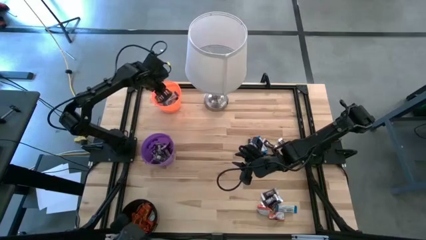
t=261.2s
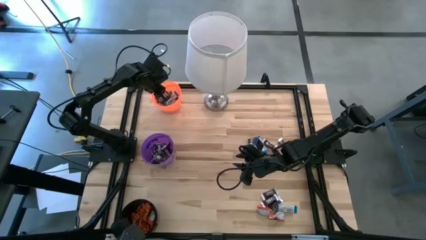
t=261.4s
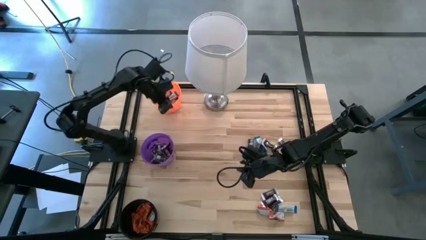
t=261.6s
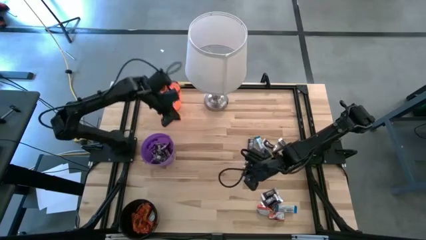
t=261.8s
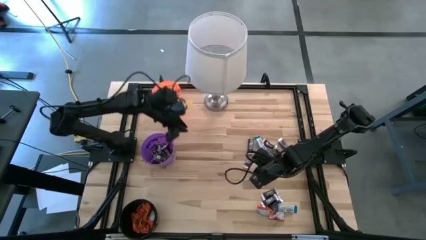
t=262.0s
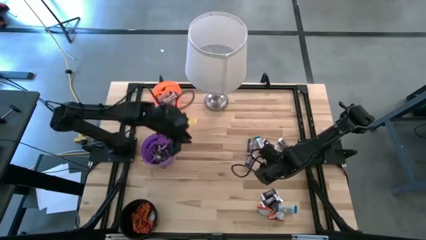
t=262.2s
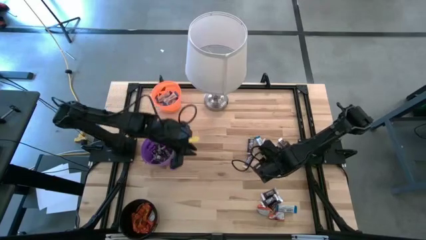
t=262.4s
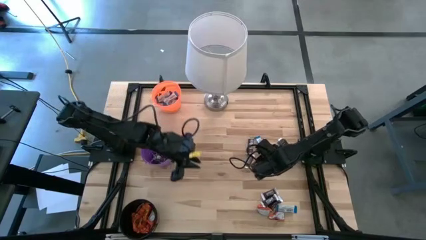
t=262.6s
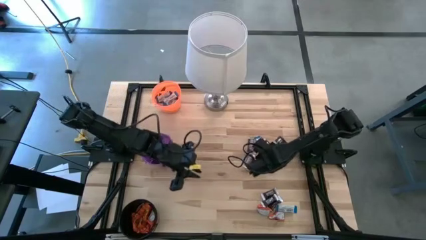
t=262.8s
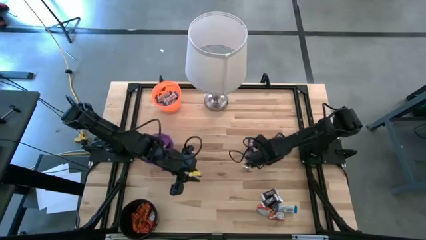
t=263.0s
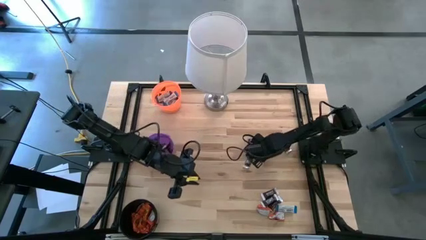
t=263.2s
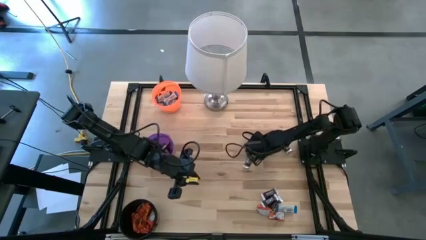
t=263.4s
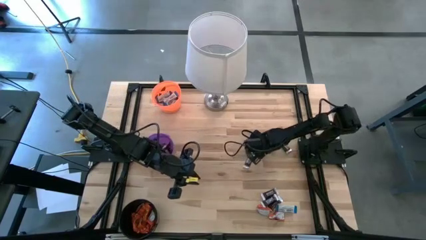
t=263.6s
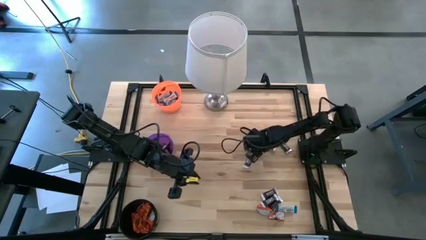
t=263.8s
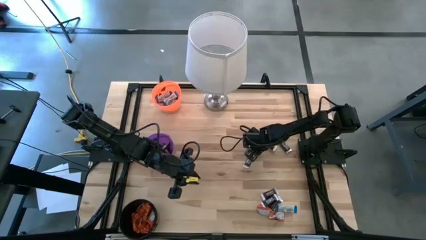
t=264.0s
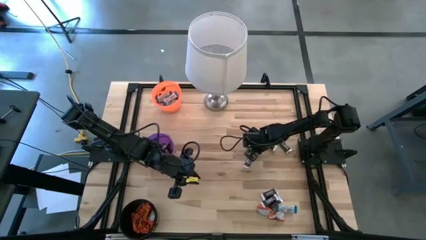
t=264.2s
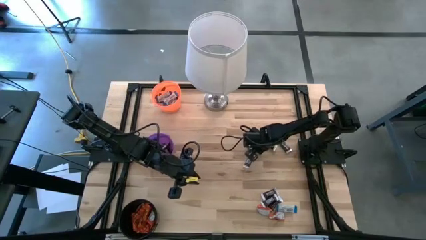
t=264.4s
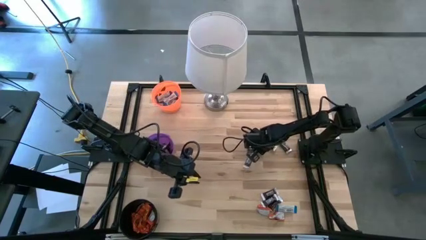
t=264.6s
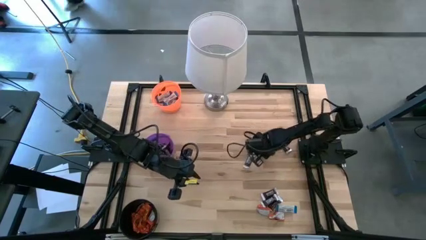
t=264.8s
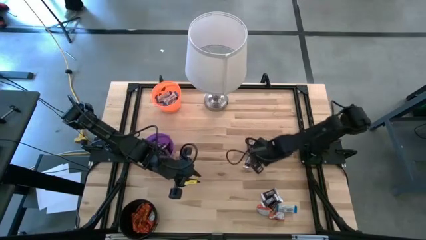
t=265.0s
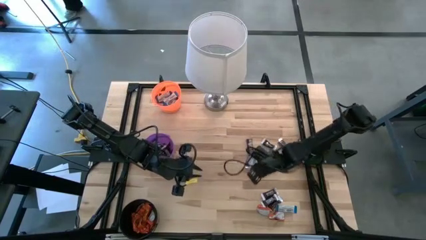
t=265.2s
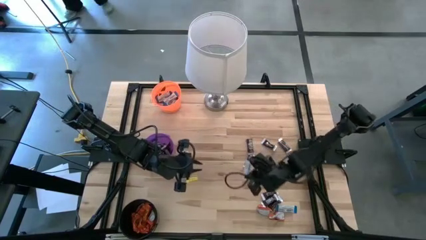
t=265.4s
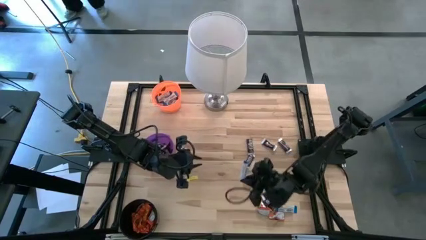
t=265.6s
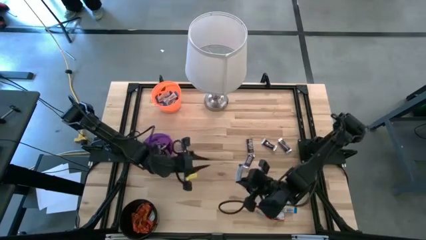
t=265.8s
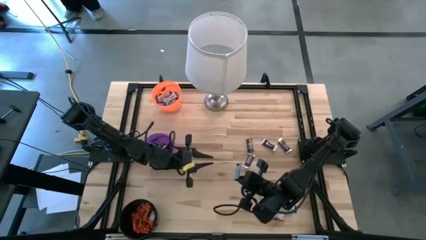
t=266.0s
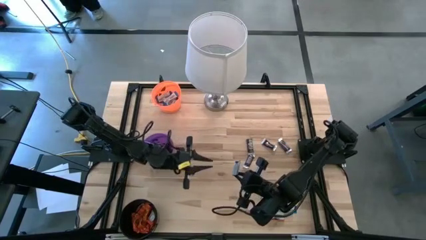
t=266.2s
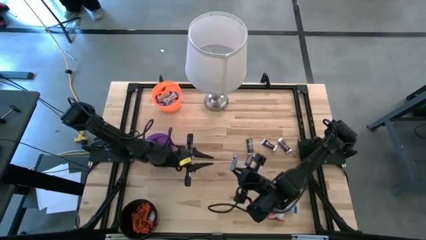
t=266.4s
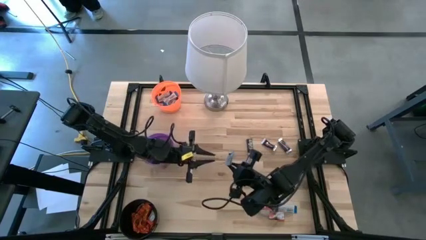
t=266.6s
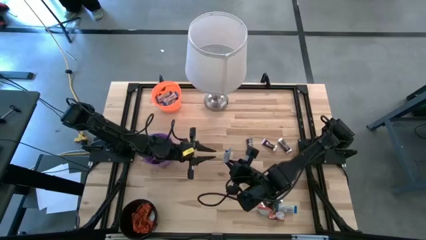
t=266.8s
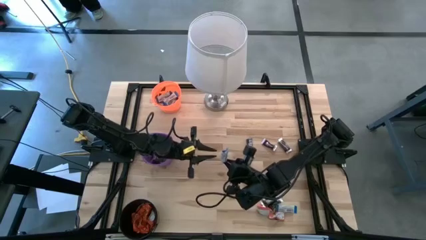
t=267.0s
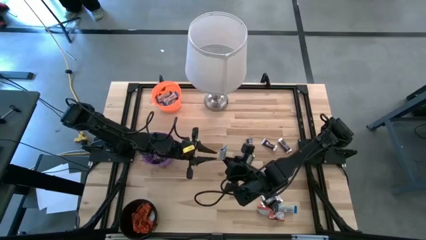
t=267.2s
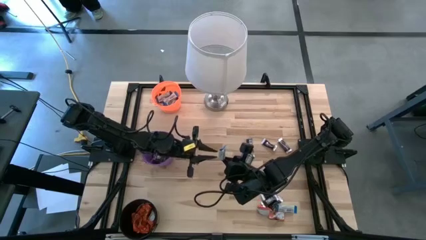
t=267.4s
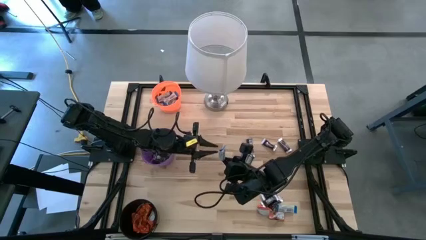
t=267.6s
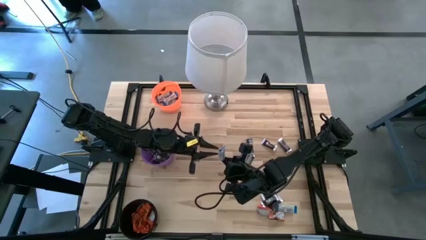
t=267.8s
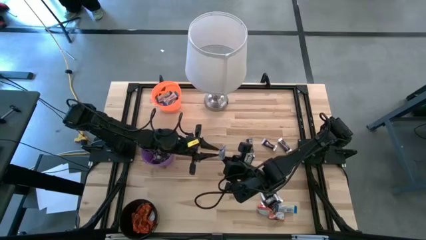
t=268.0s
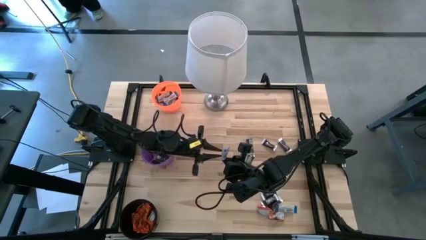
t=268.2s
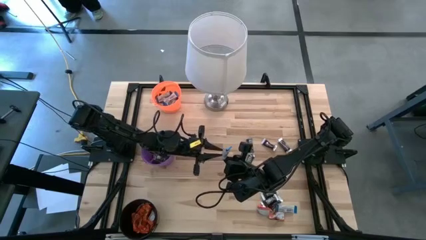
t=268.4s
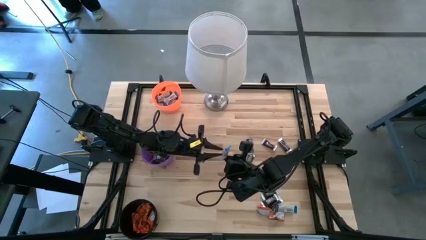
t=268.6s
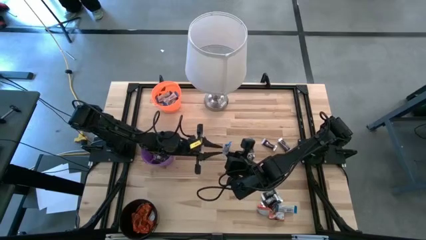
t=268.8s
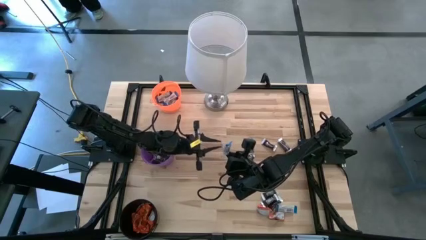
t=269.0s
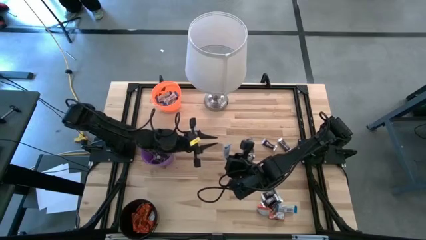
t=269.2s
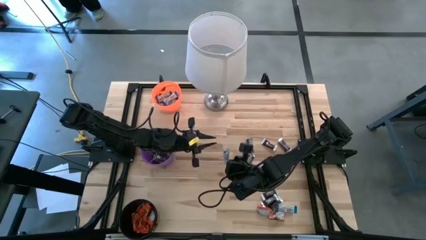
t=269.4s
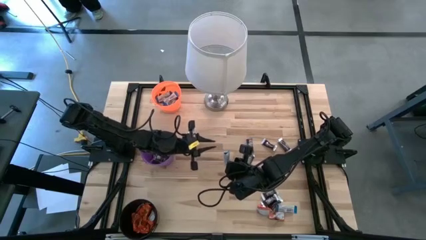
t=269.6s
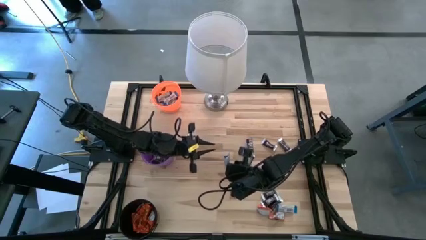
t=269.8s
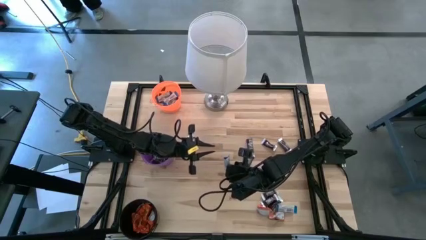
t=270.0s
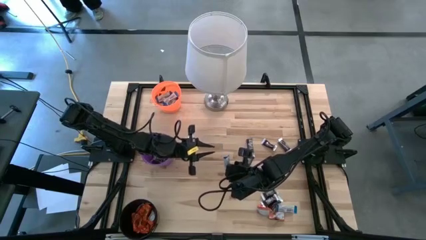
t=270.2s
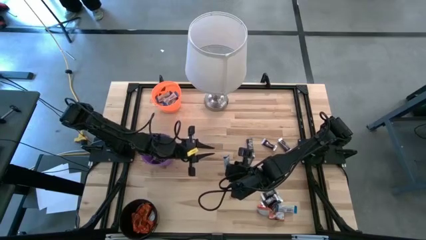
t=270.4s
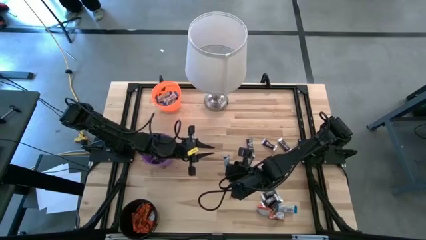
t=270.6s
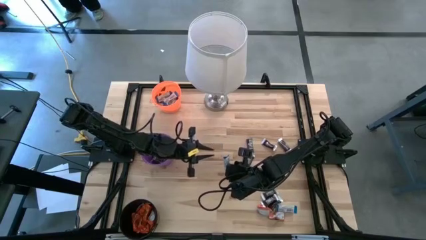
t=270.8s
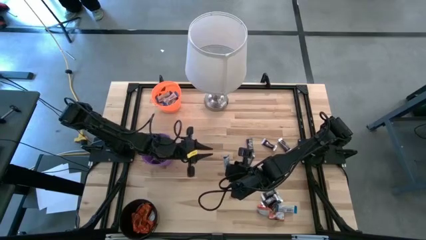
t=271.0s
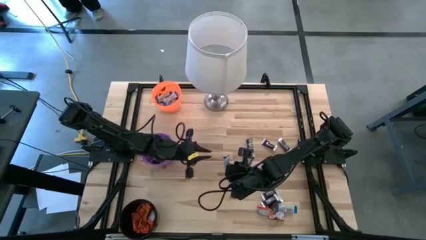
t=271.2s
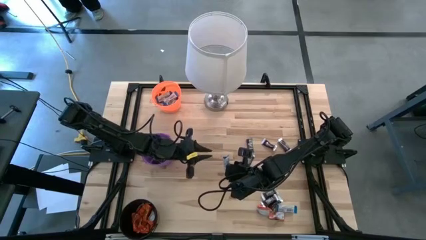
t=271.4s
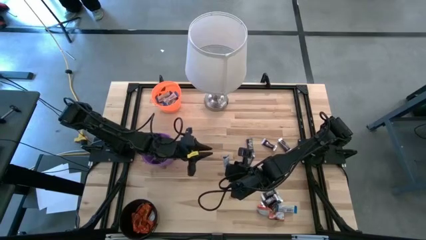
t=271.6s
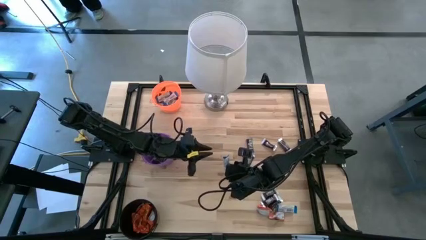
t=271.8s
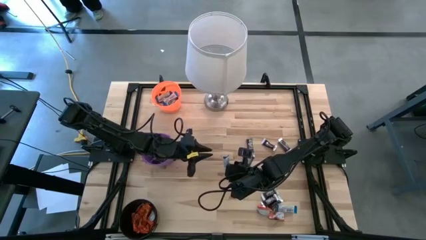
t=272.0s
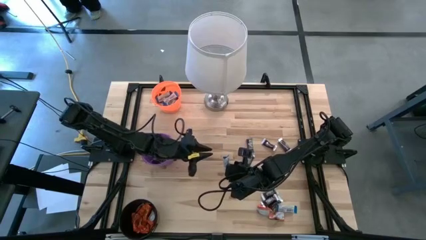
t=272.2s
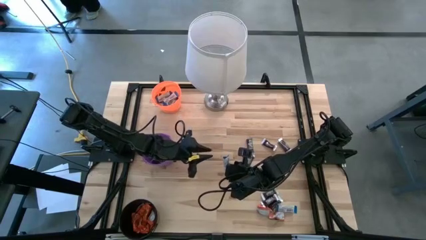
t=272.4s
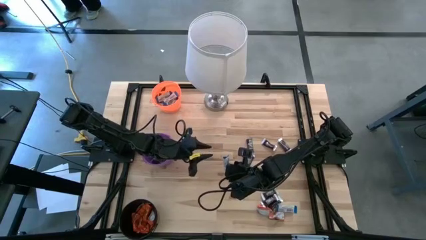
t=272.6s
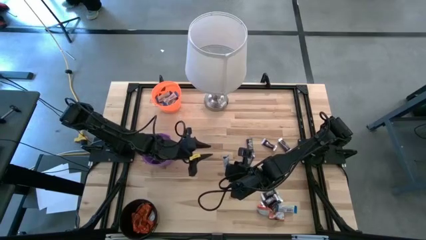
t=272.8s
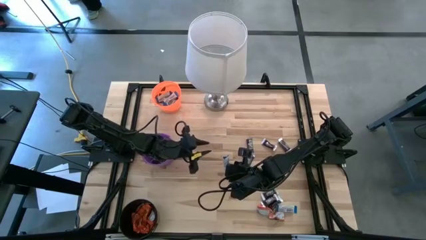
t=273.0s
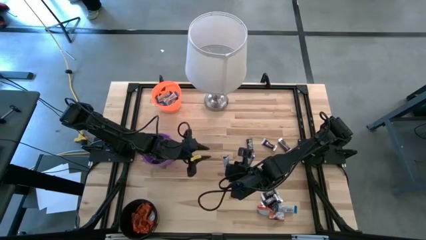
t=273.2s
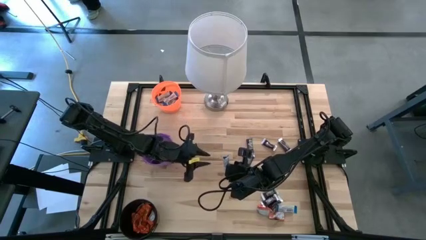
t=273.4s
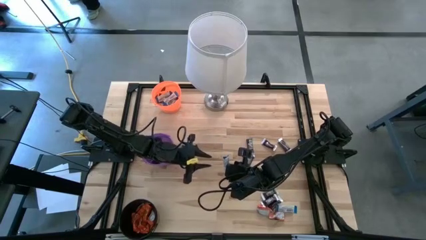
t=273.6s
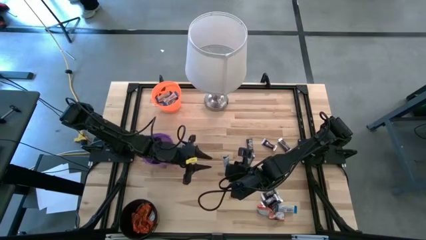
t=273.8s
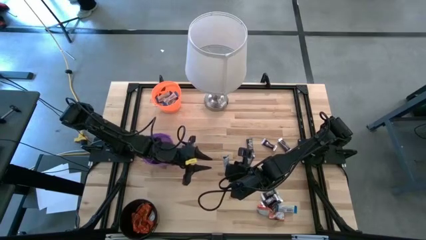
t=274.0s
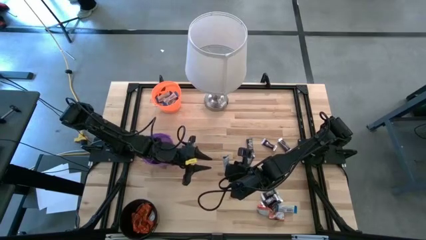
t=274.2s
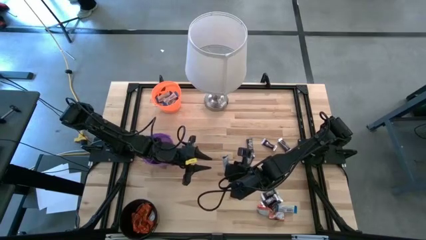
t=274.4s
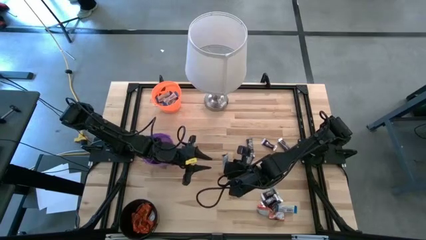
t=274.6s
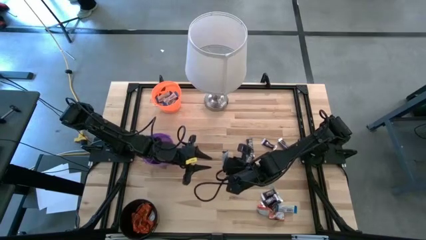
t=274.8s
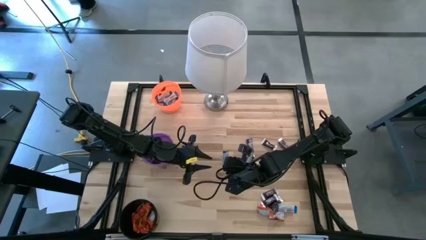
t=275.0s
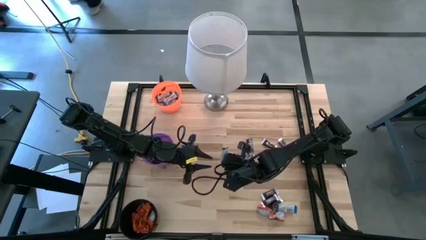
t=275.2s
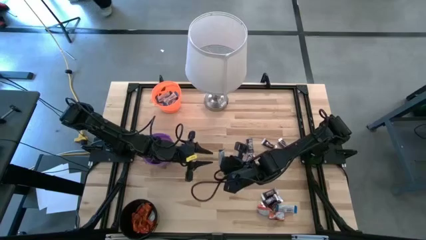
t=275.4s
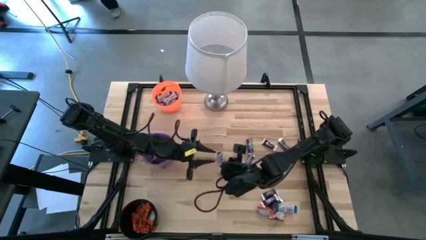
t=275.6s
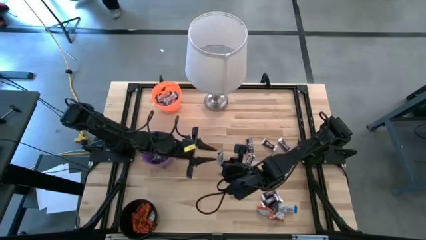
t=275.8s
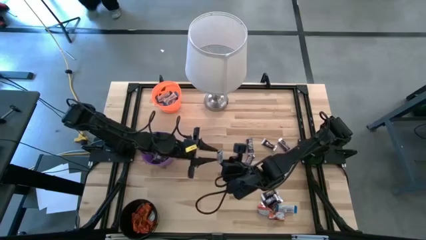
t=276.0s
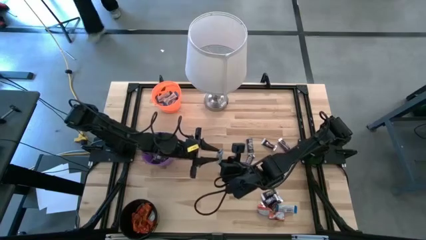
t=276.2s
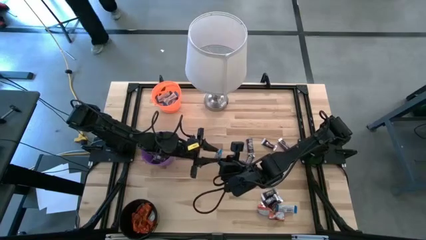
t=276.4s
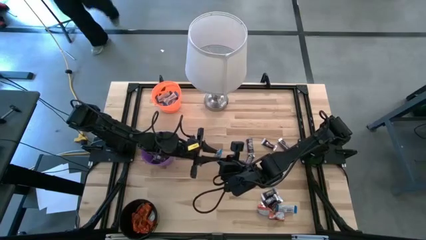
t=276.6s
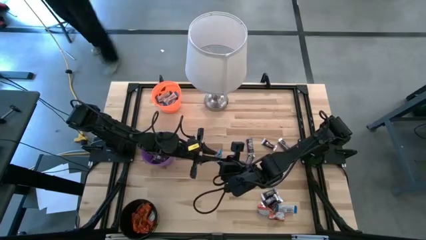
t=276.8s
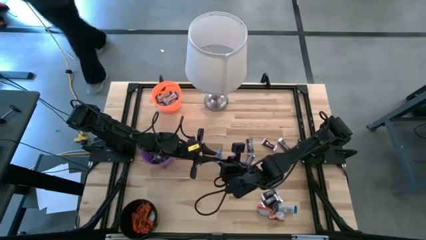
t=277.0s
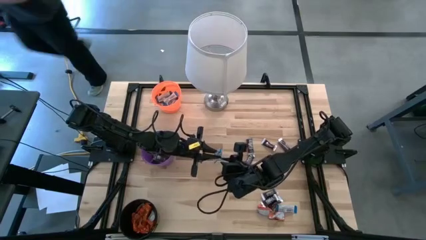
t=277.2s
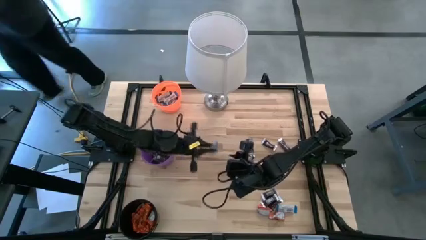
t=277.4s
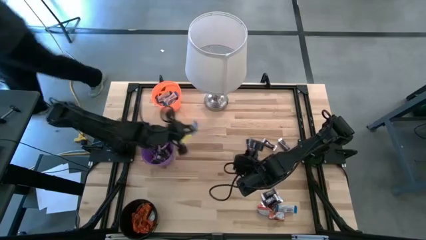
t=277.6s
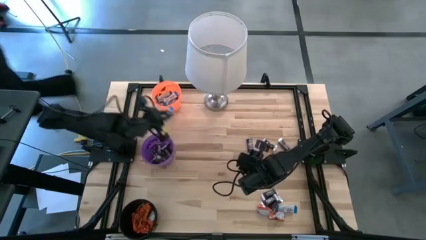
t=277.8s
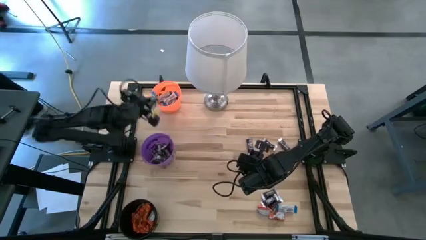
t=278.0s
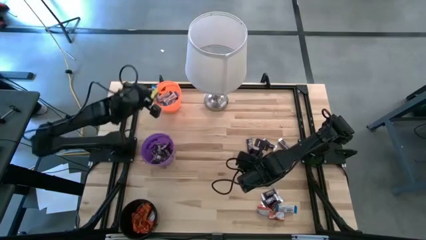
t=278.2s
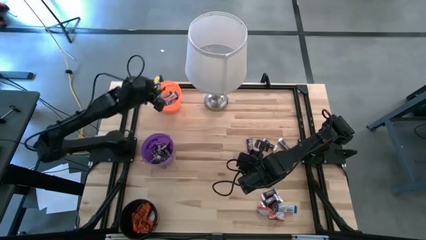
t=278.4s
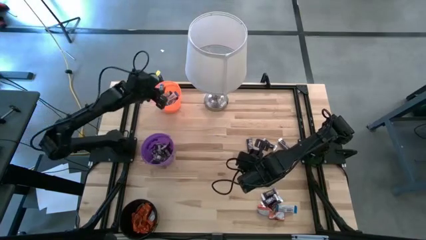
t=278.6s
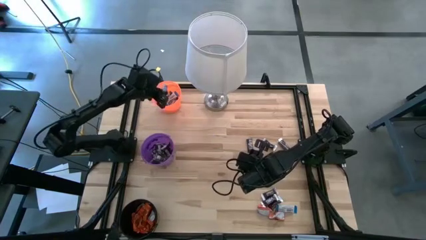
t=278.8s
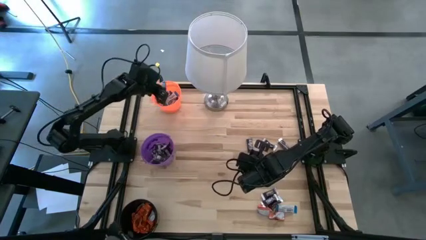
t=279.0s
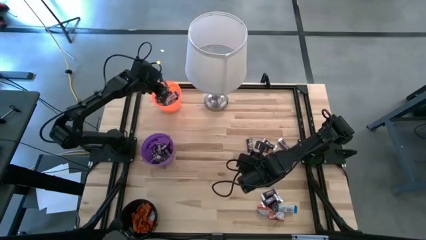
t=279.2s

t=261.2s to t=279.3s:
Task: Sort candy
Put the white chocolate into the orange bucket
